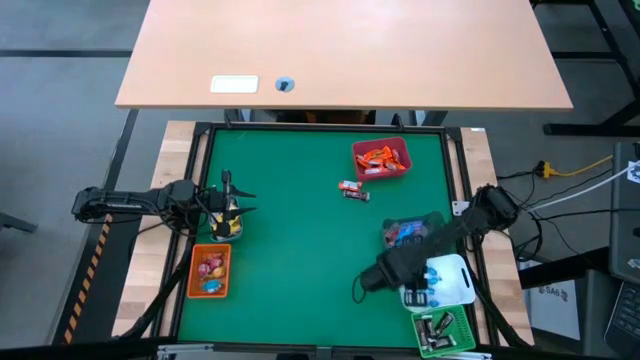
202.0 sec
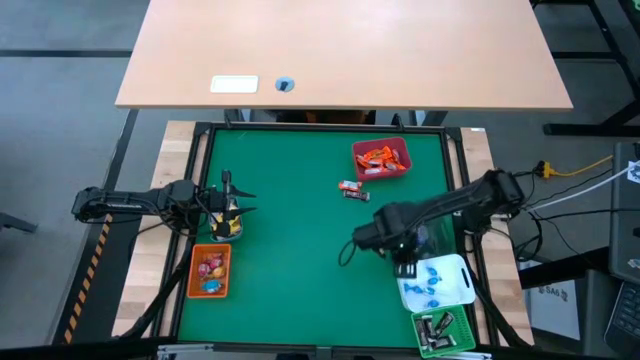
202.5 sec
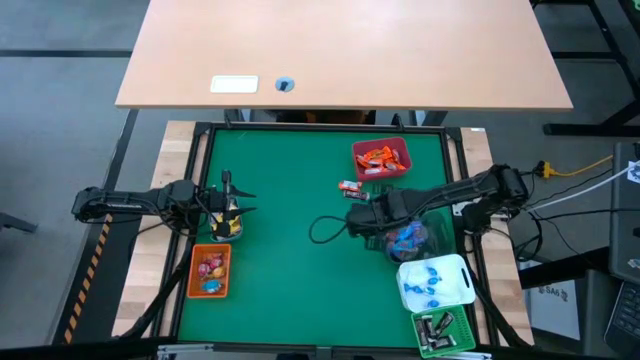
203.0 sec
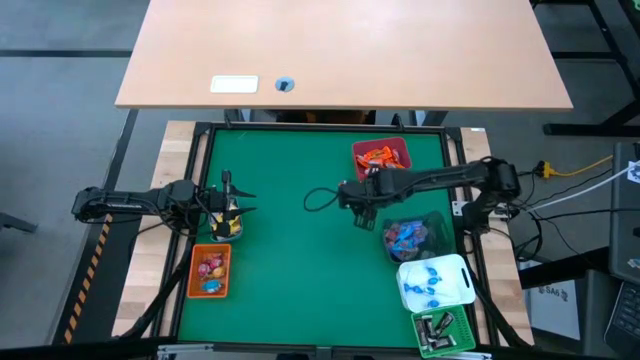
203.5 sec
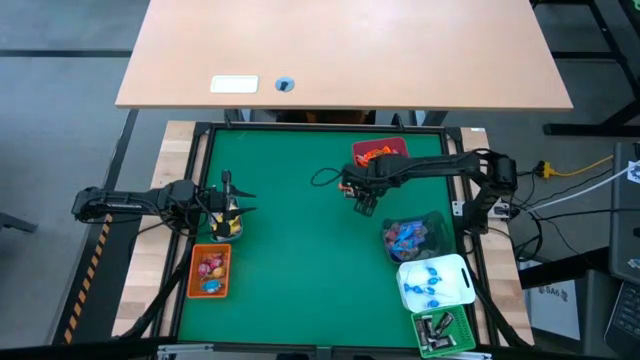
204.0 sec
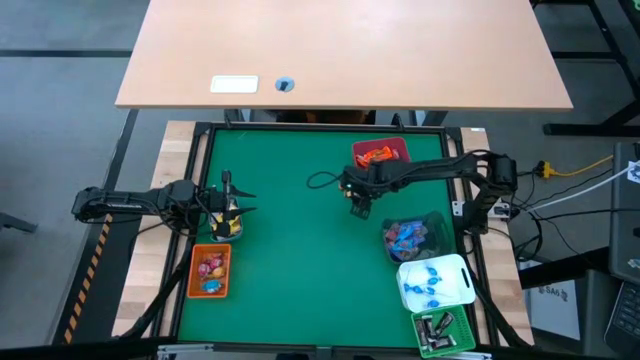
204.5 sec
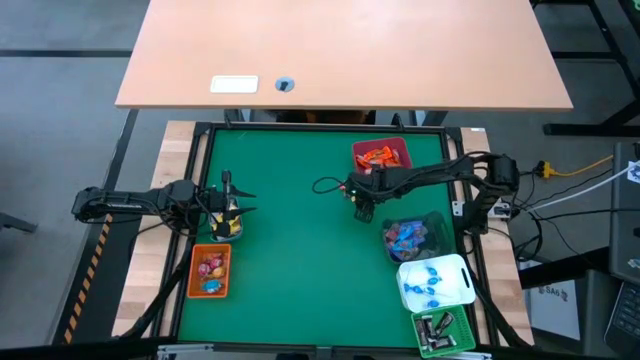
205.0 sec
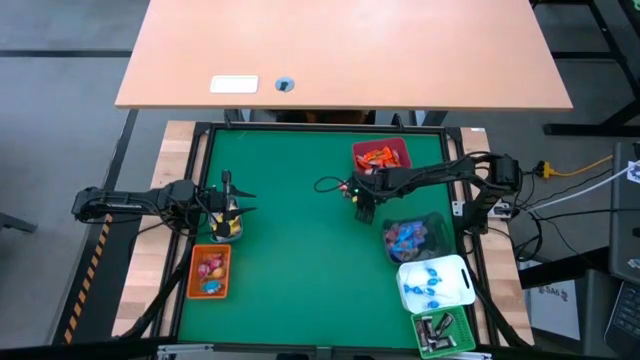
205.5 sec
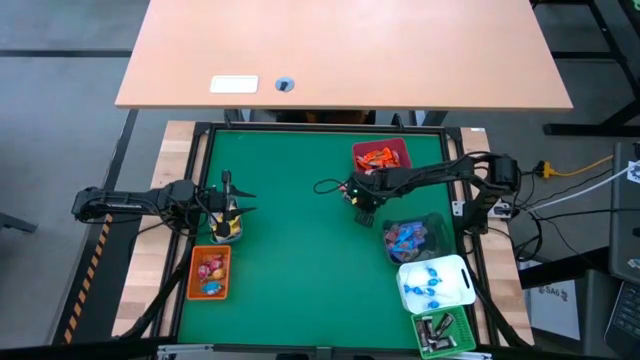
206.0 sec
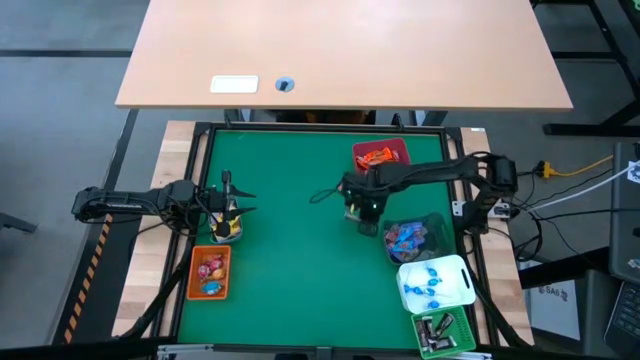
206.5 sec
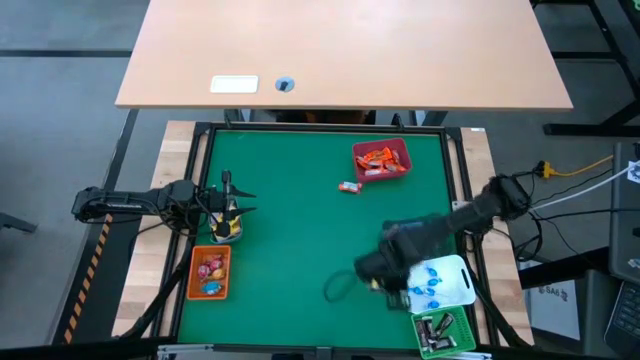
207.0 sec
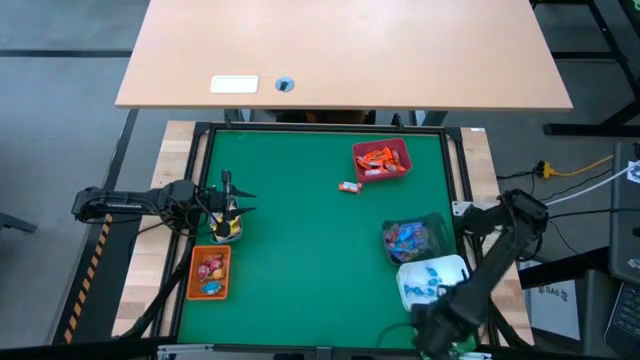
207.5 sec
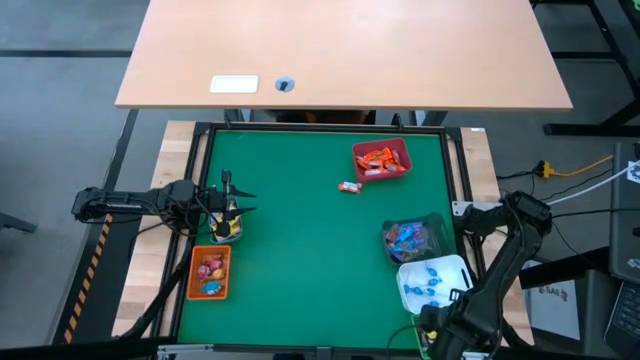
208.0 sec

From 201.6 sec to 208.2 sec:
Task: Sort candy
Put the brown chocolate bar into the green bin

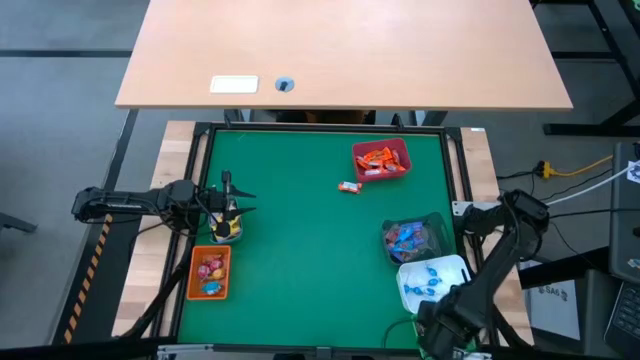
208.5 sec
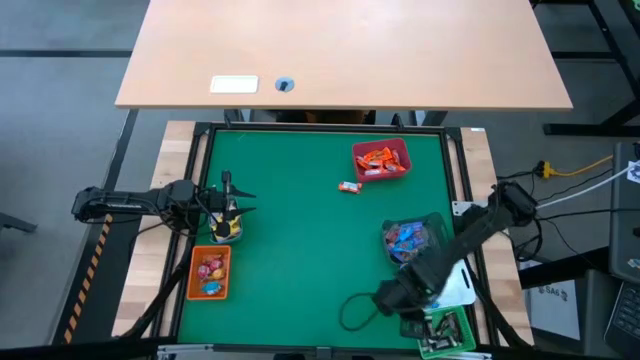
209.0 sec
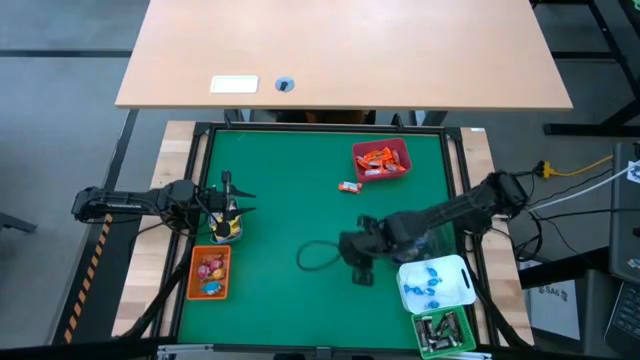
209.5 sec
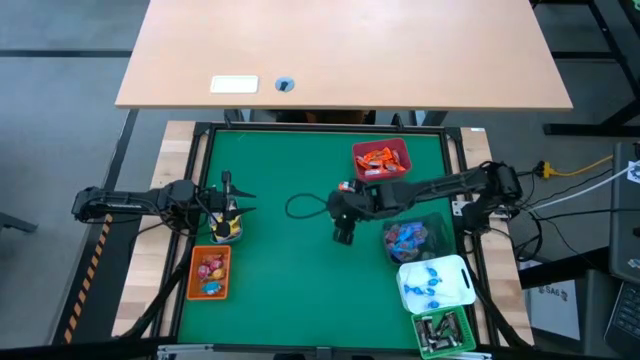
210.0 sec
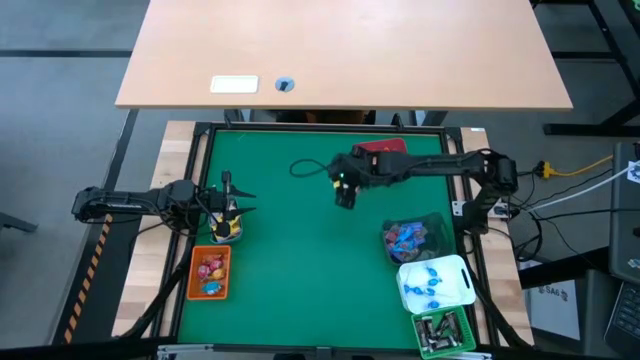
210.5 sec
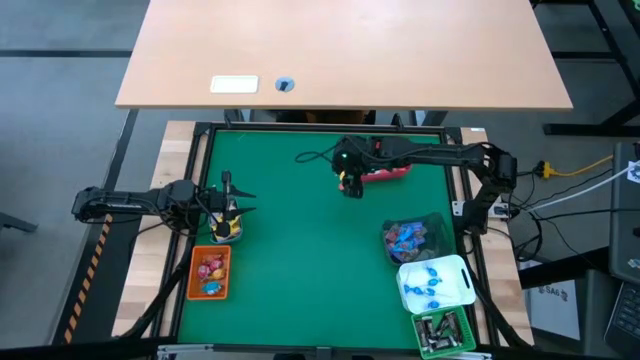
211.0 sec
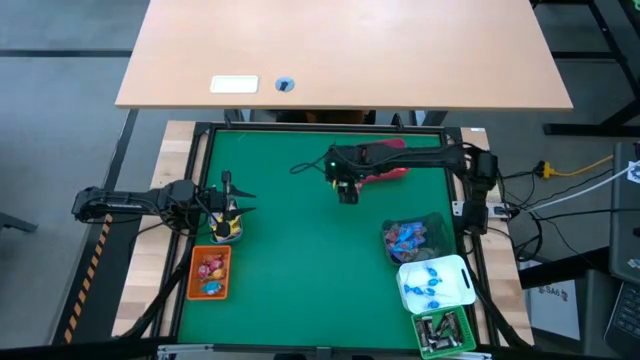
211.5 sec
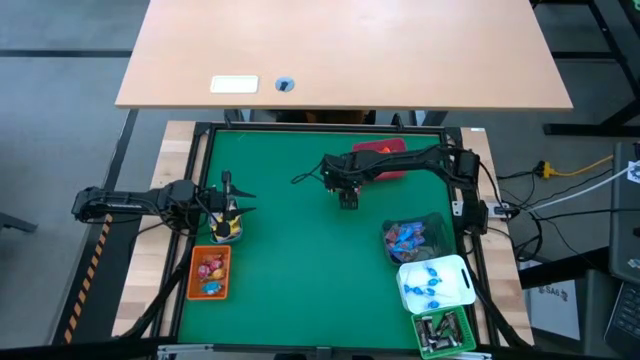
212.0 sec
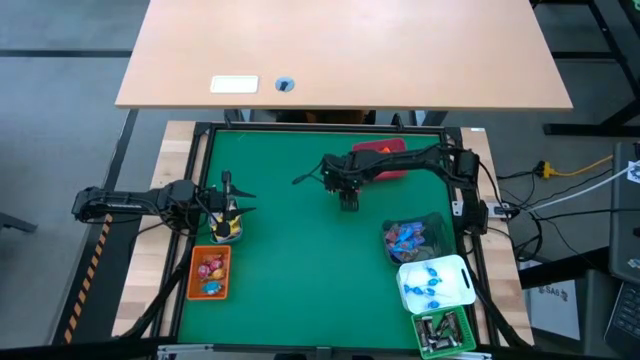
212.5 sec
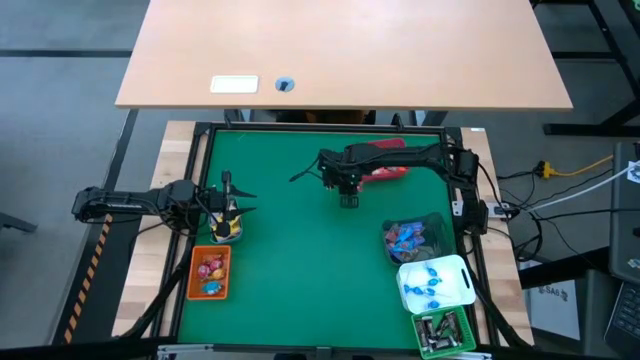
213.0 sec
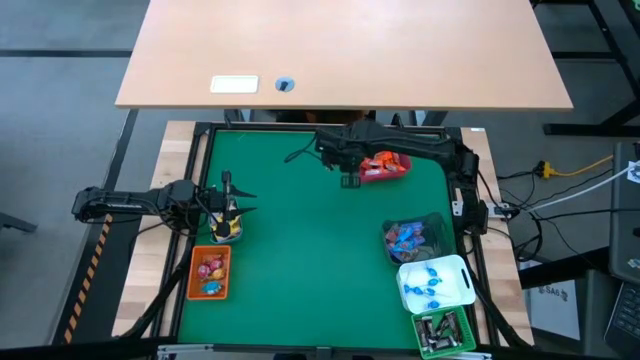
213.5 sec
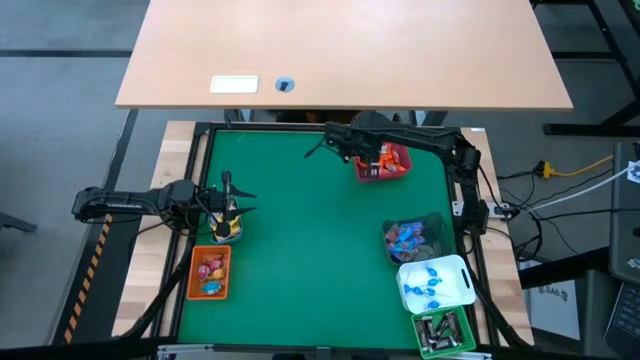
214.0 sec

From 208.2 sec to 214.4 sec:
Put the orange chocolate bar into the red bin

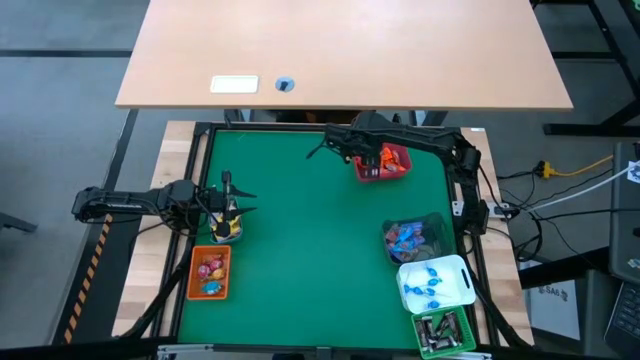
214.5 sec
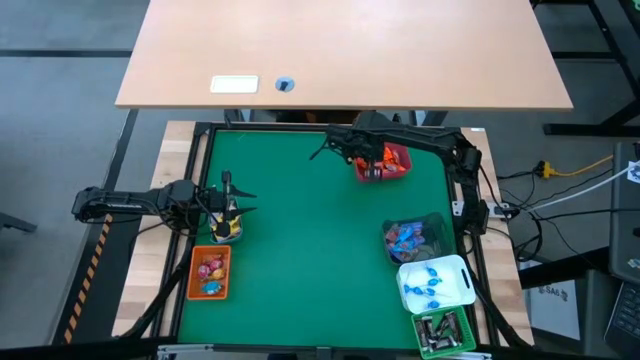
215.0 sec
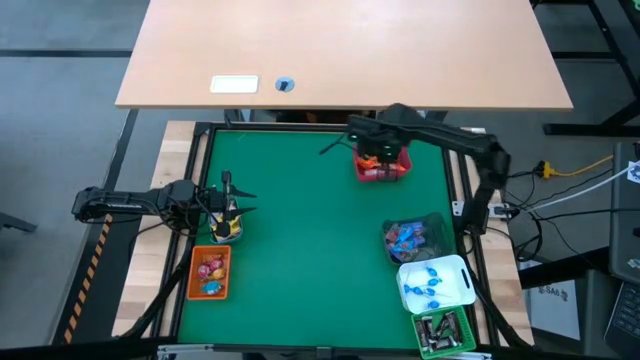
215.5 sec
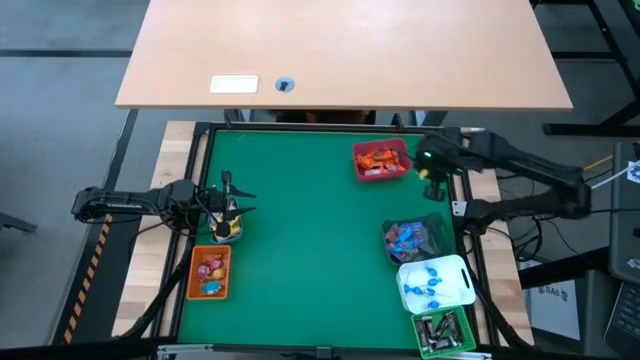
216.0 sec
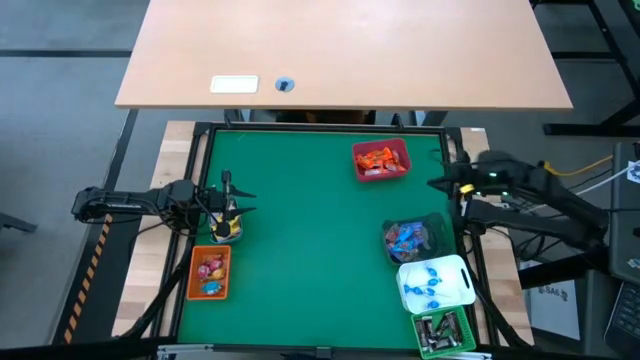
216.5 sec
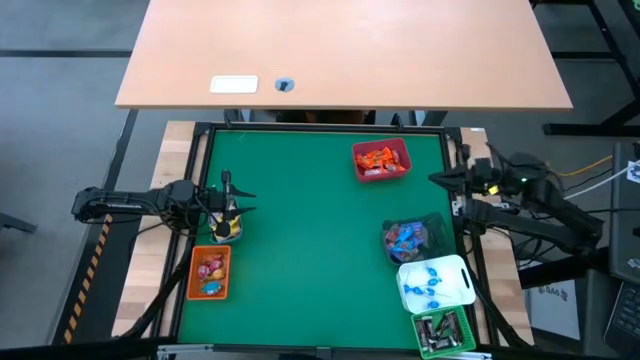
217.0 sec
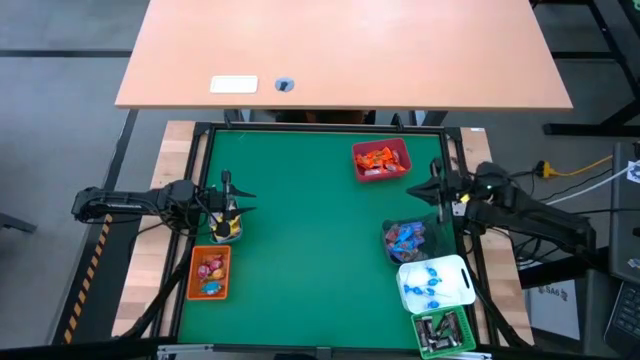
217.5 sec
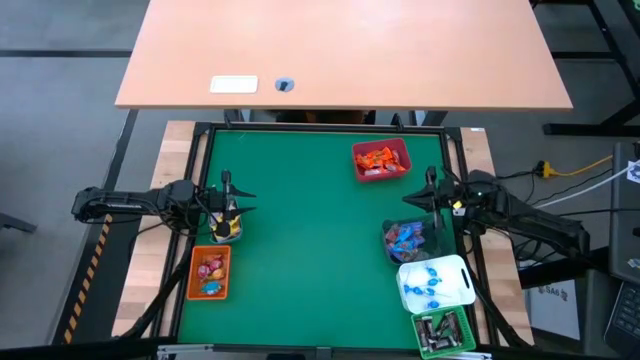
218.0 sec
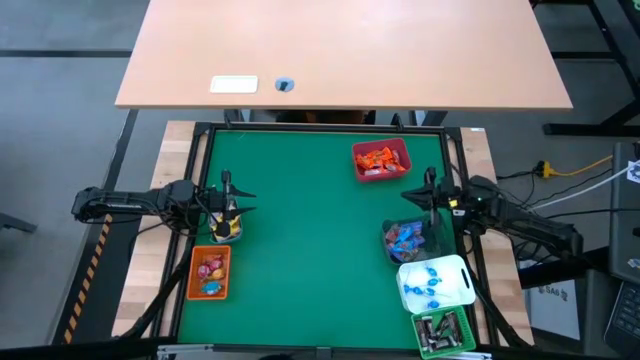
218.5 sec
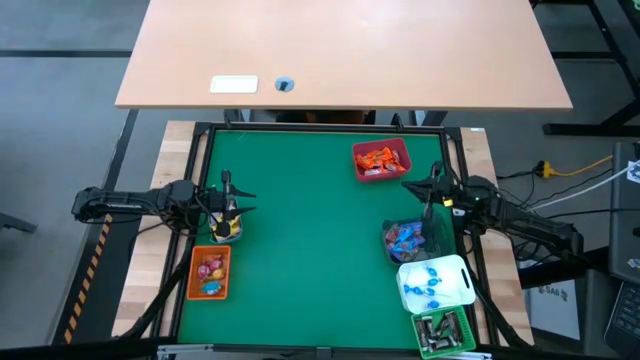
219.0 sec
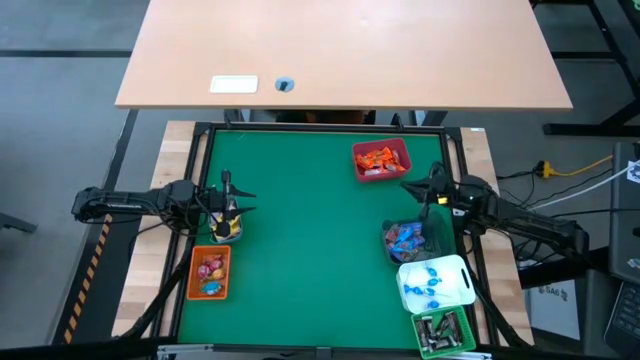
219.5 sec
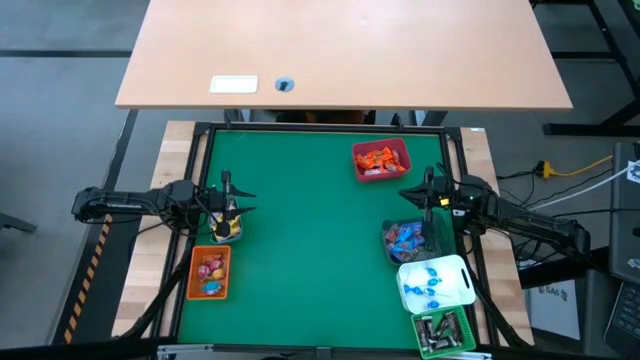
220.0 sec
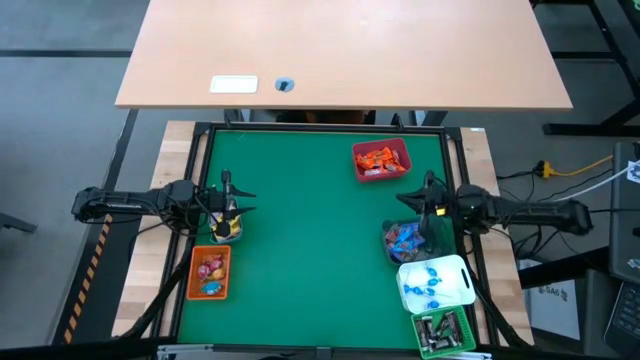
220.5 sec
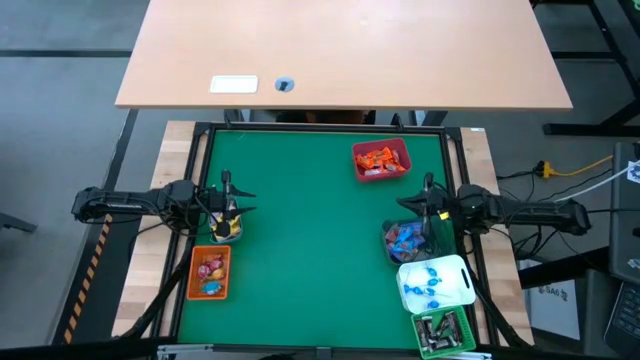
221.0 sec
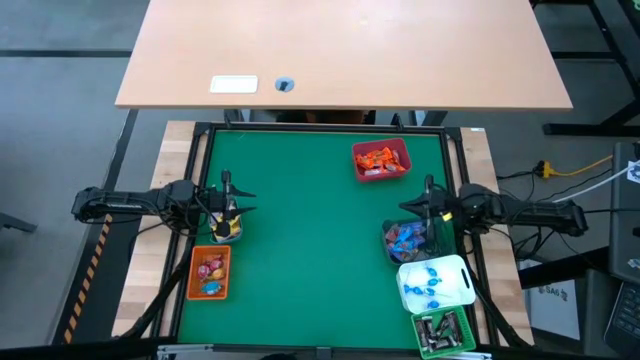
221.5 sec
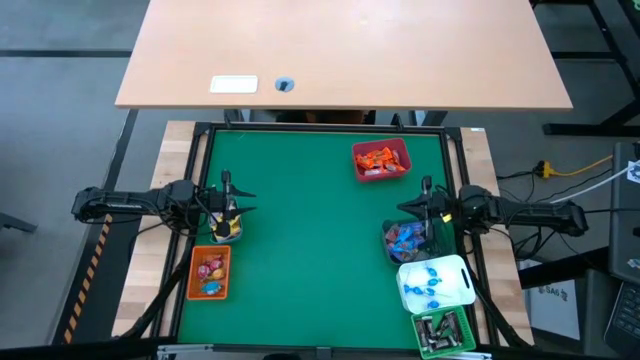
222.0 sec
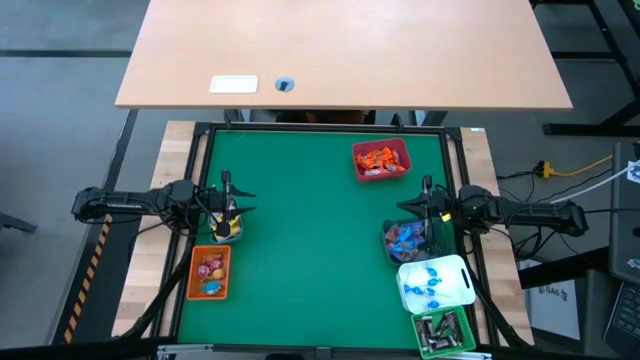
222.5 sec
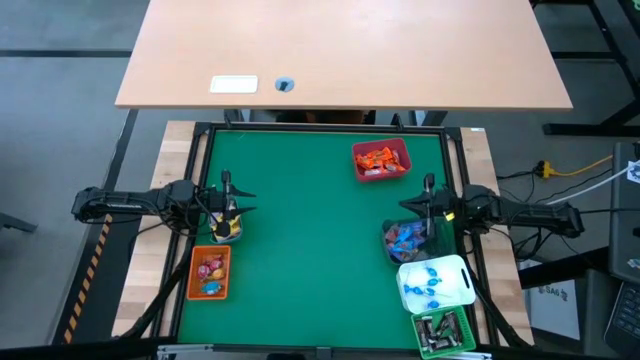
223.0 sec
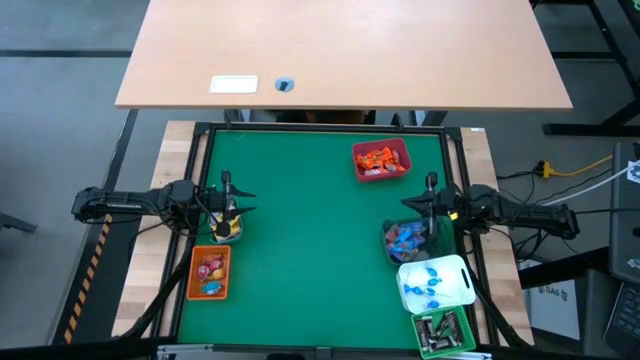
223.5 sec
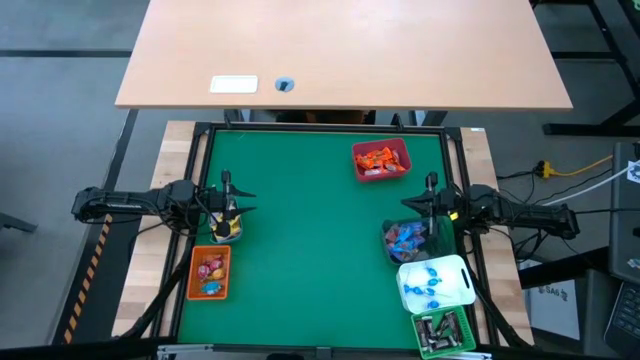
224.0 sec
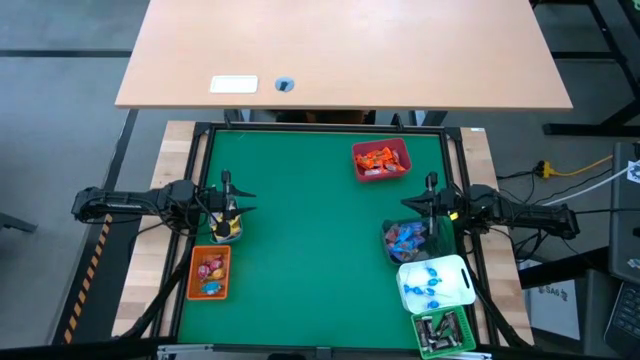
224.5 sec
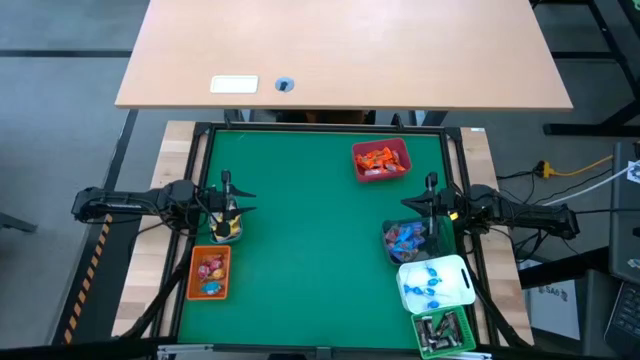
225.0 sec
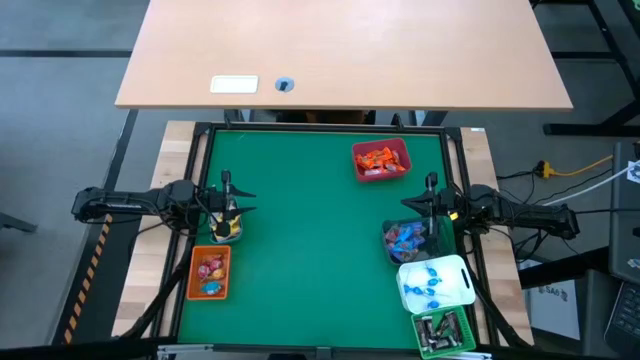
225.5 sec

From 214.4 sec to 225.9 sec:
Return to Home Position
